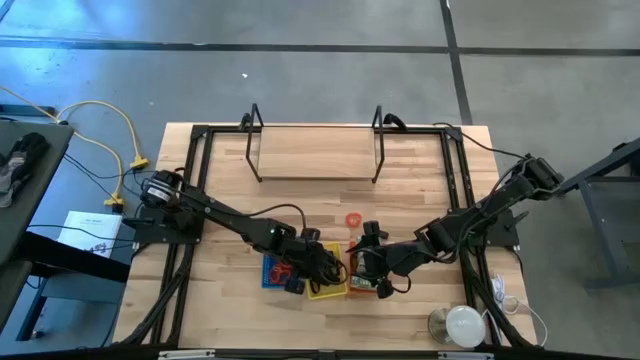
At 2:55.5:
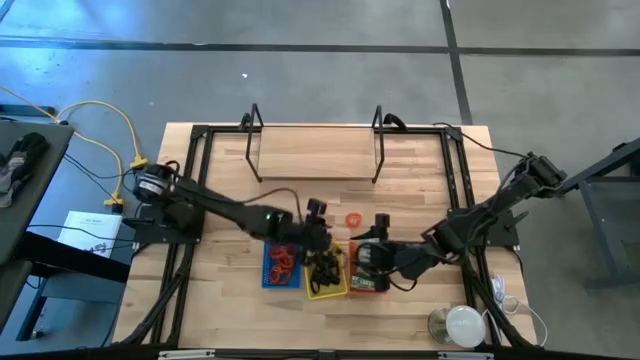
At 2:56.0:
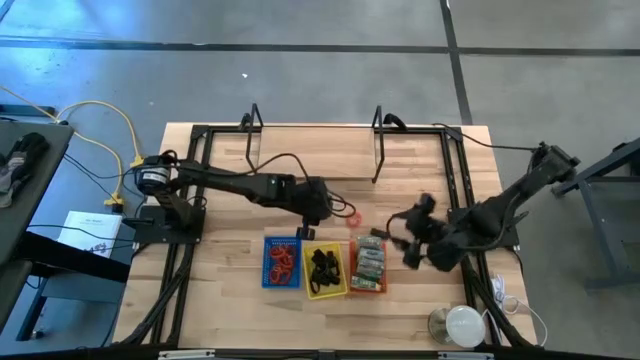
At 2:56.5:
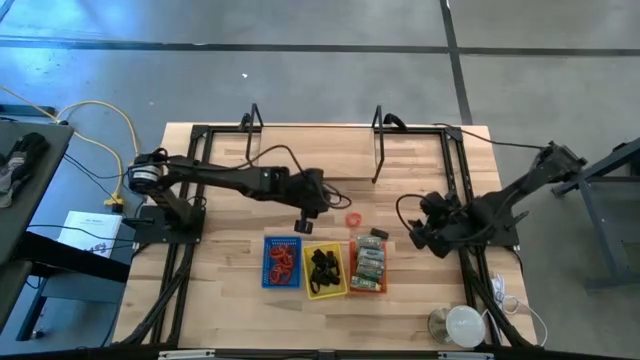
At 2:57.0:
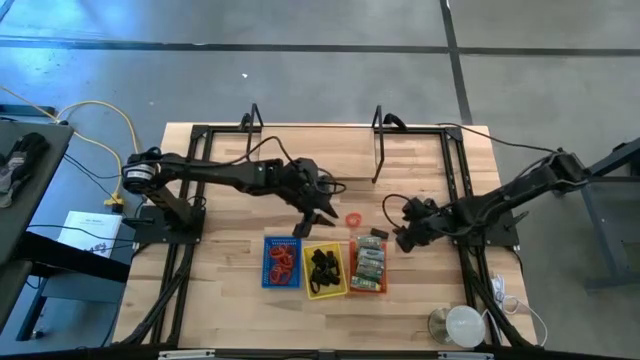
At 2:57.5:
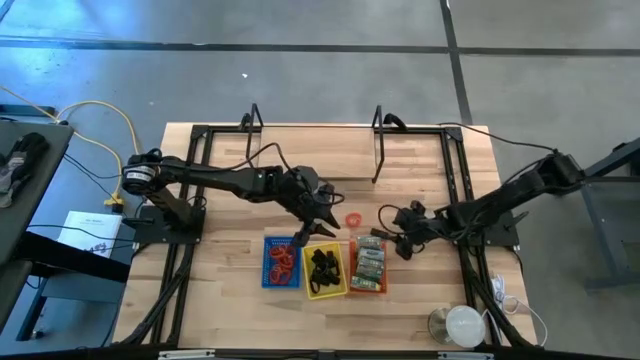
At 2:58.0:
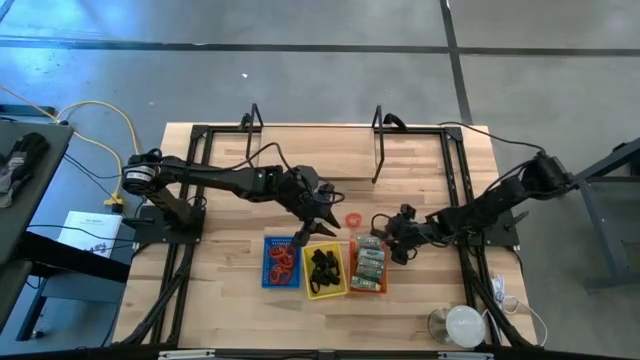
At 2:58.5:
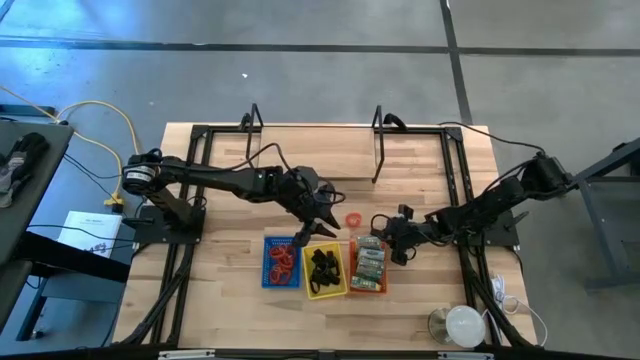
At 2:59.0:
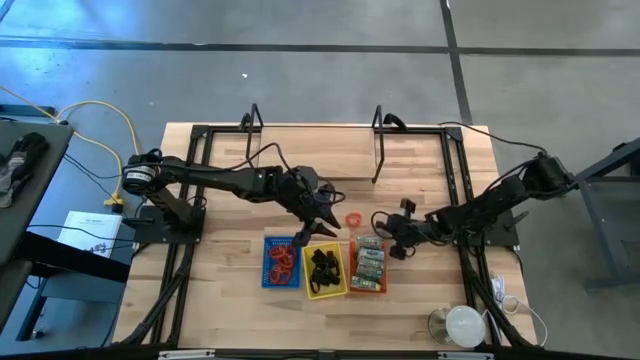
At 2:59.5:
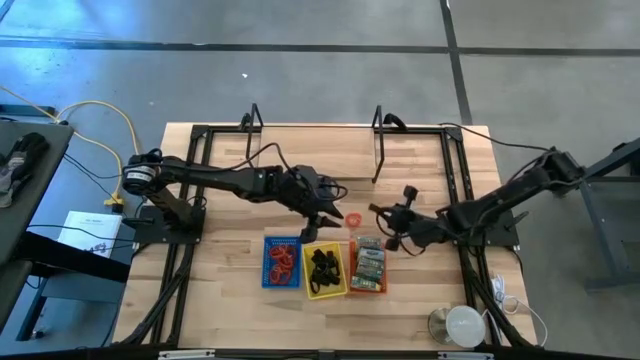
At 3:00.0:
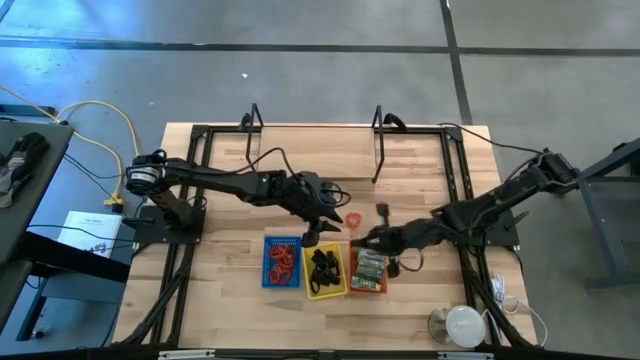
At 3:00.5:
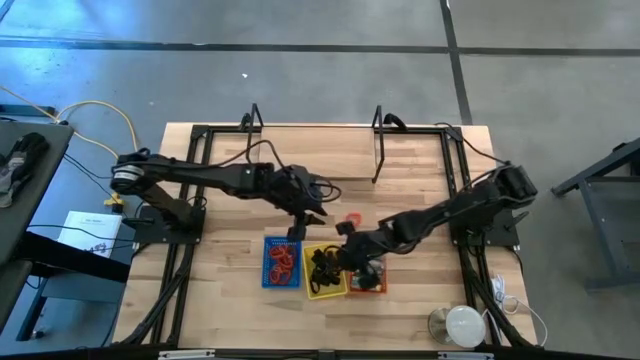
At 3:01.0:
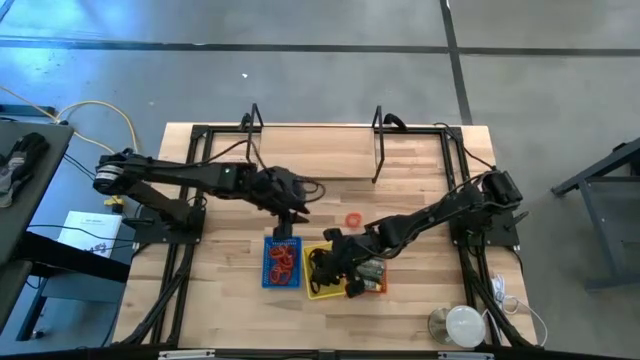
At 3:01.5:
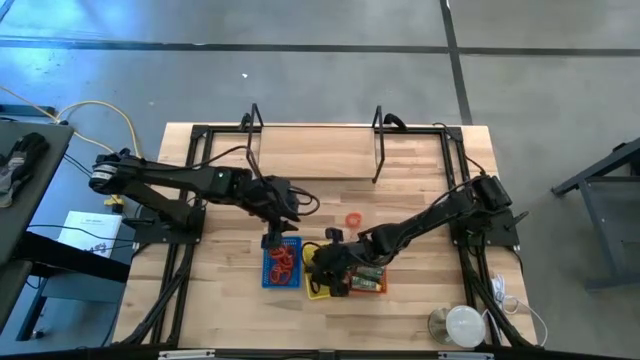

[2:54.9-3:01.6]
Task: Pick & Place Office Desk Supplies
Put the black rubber band into the yellow basket

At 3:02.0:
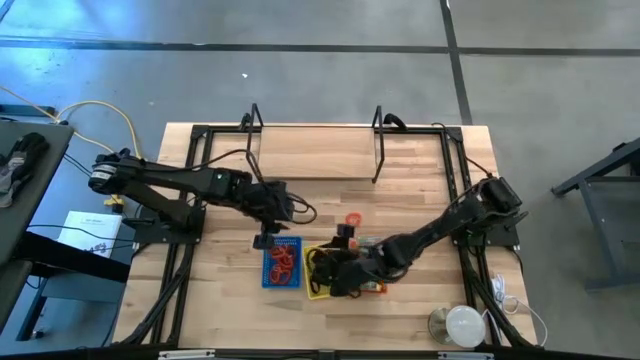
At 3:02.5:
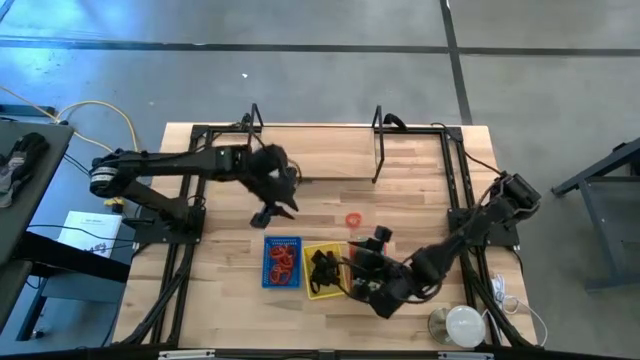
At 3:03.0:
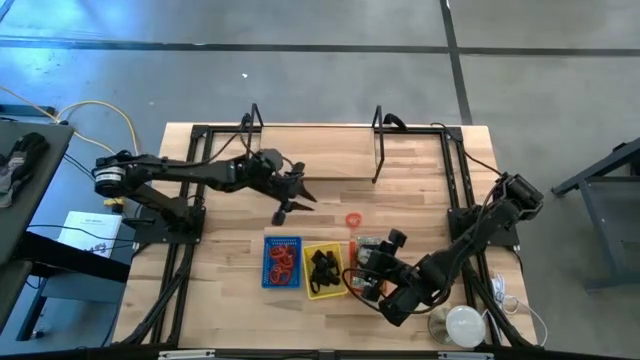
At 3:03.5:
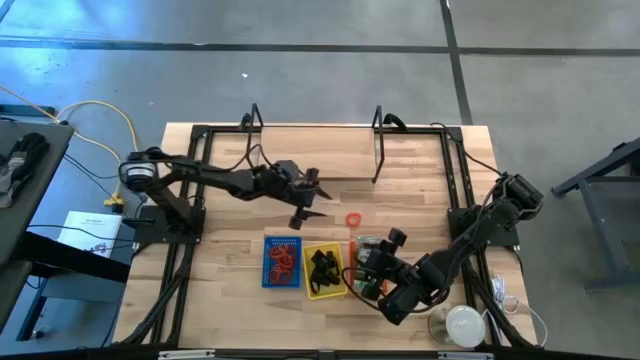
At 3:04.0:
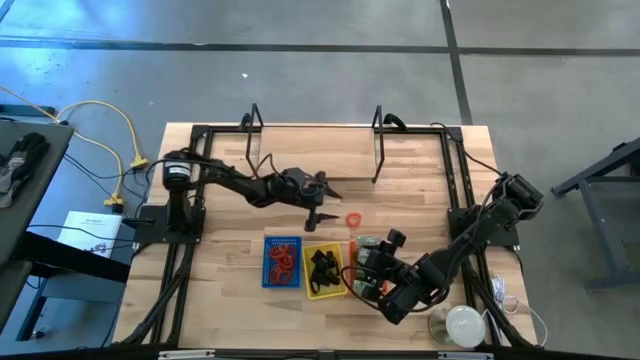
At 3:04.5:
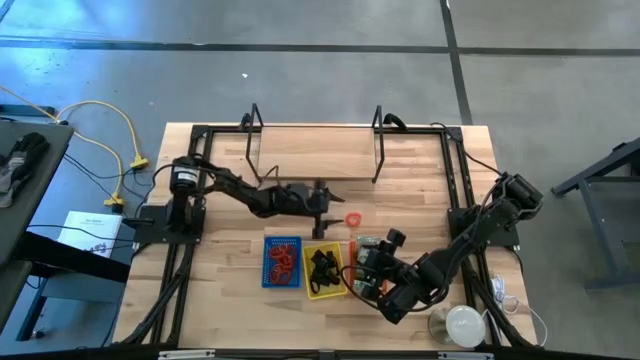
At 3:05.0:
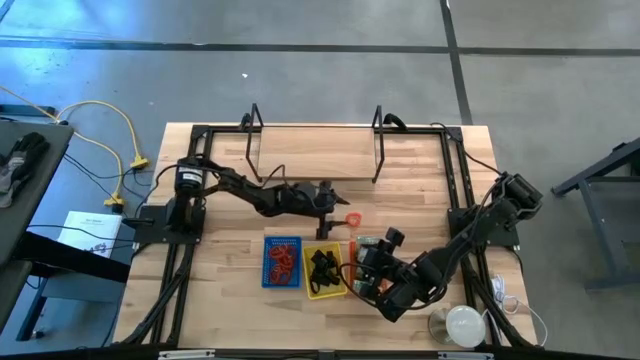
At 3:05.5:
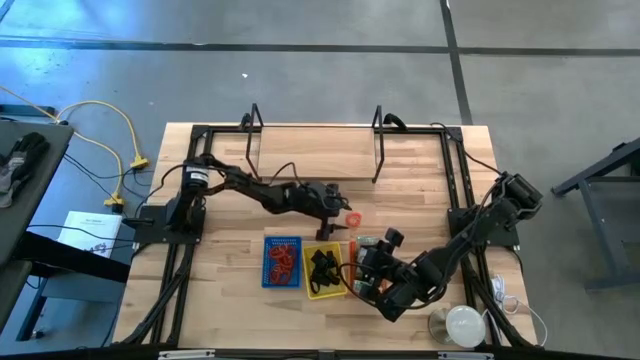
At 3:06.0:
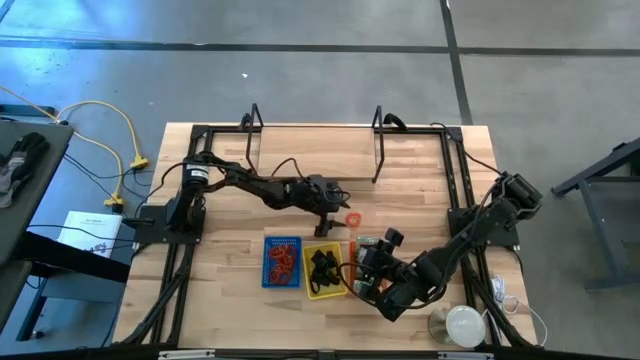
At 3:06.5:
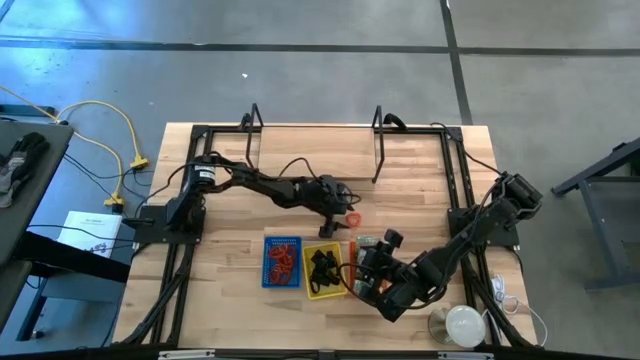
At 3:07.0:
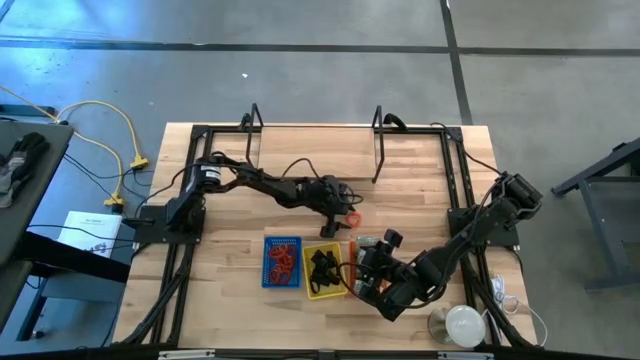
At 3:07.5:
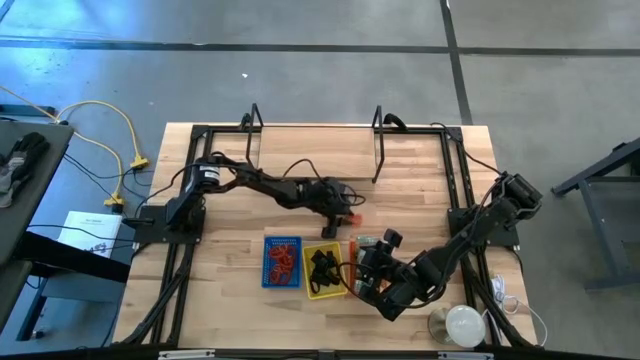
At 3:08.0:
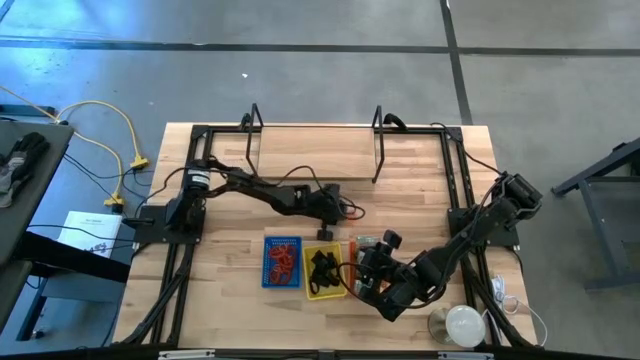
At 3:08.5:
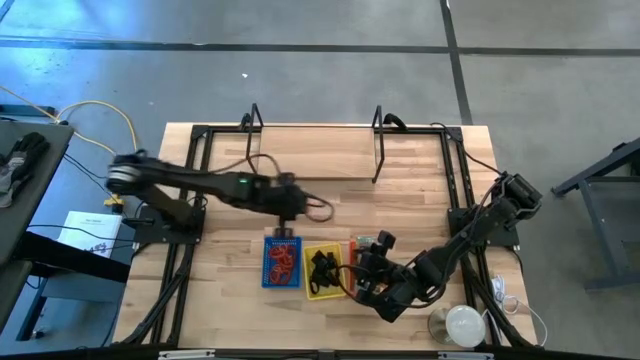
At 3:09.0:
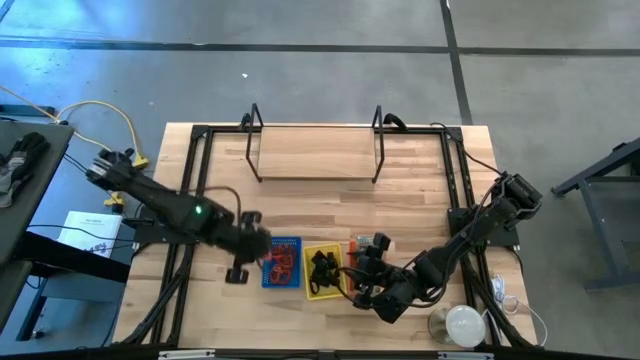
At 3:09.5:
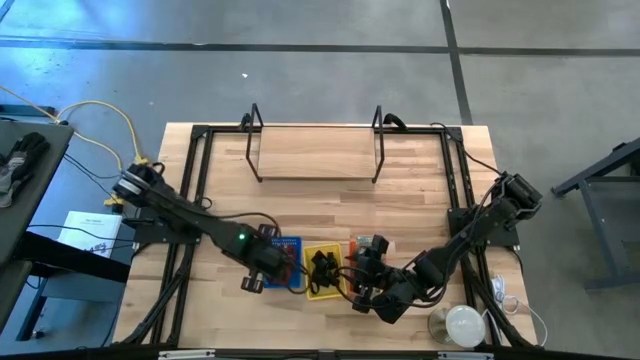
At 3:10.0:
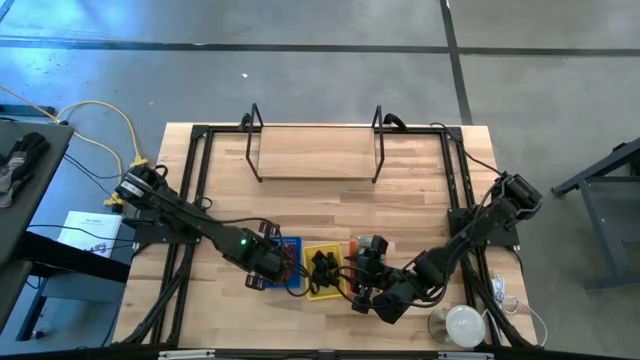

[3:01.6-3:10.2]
Put the orange spring keychain into the blue basket

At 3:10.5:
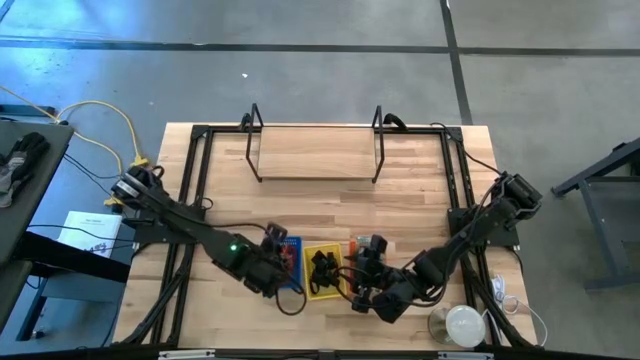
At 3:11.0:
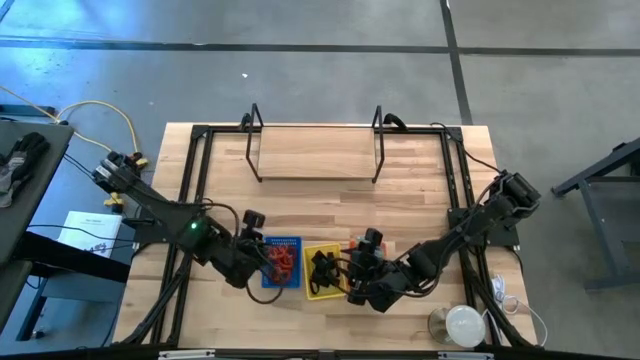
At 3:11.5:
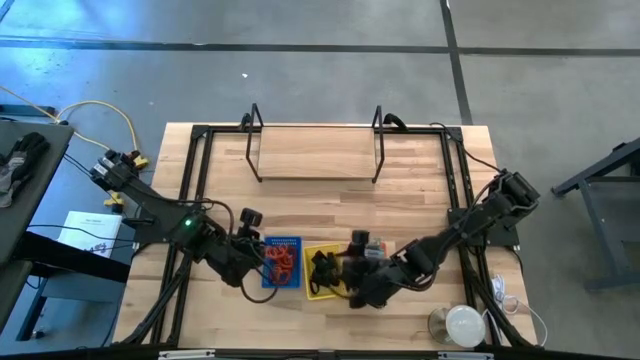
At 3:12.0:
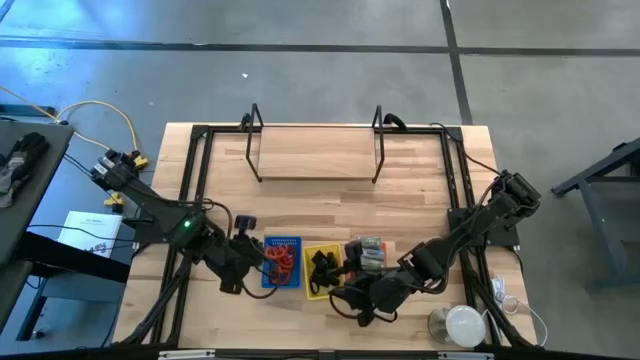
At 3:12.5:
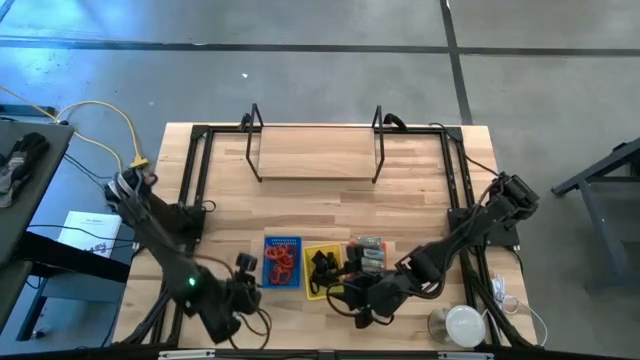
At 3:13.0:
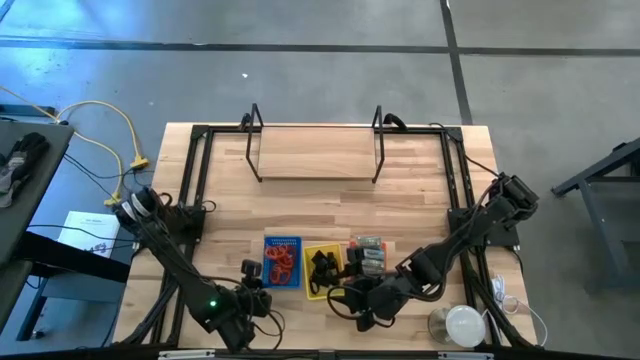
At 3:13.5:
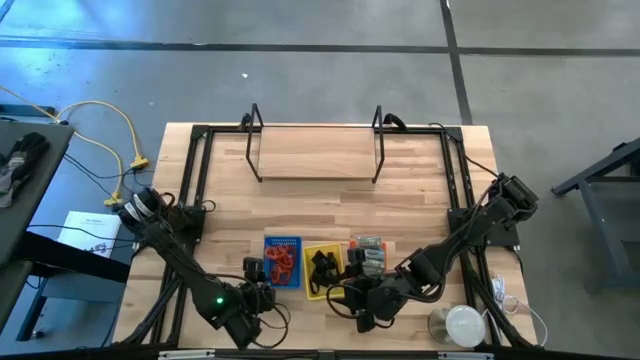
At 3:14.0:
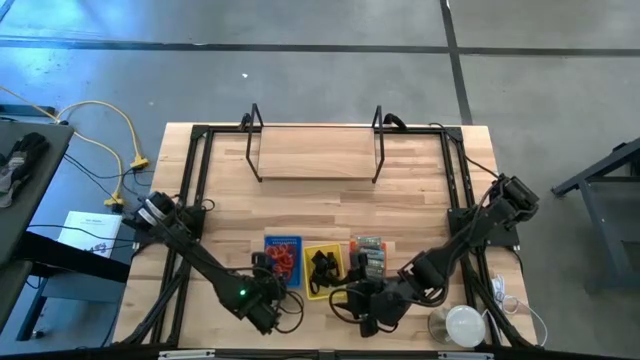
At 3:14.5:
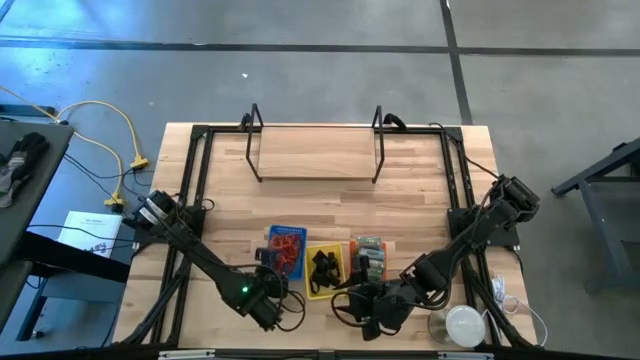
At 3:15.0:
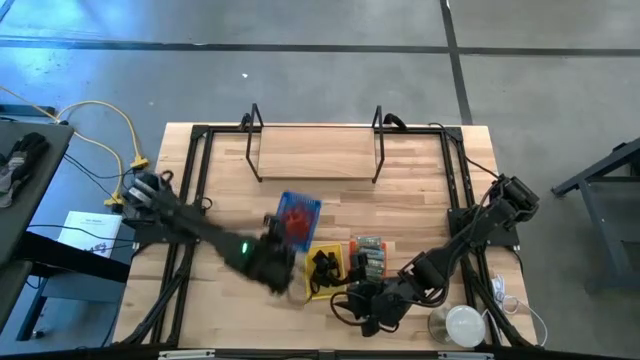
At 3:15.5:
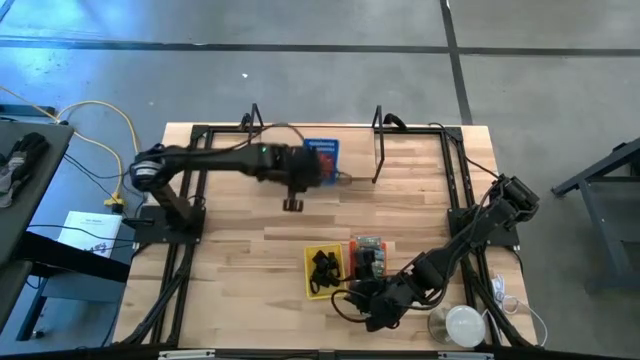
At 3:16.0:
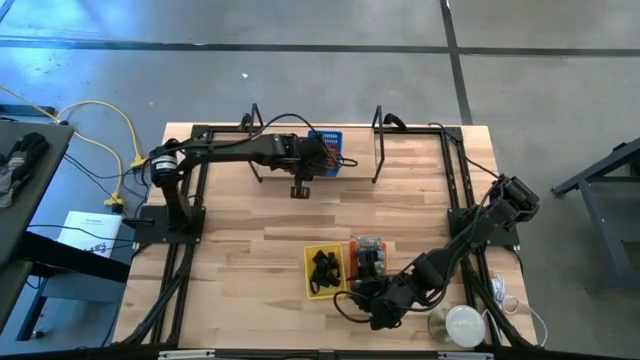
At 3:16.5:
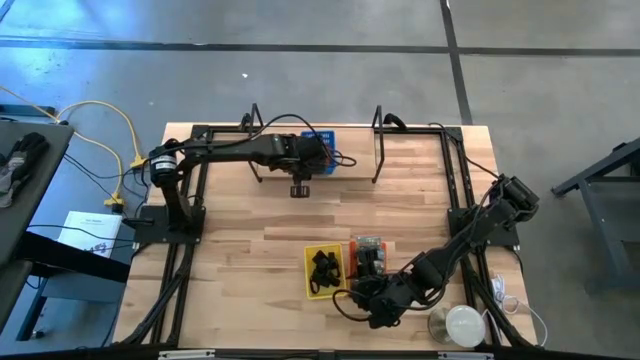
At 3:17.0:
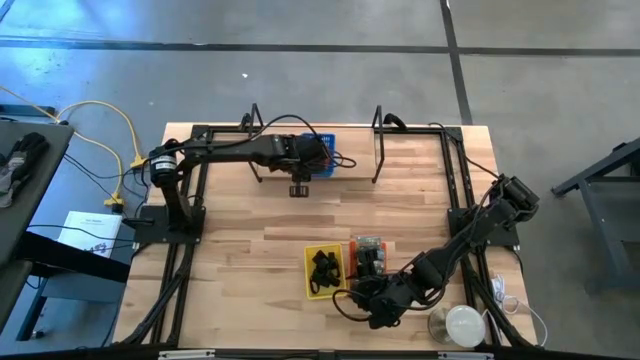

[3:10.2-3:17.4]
Put the blue basket on the shelf
